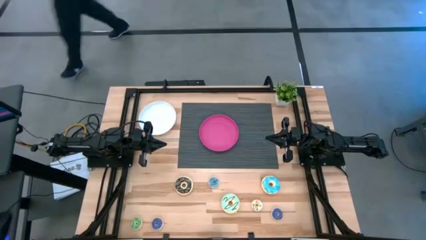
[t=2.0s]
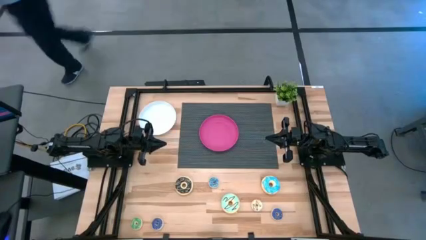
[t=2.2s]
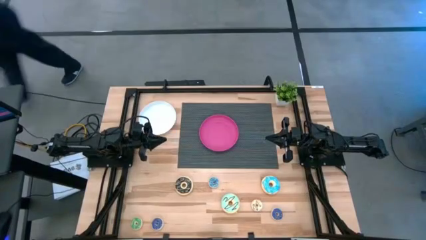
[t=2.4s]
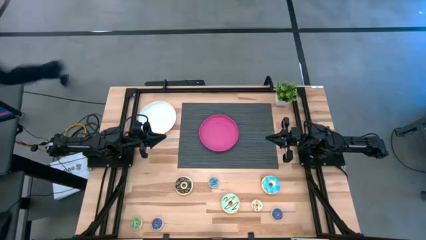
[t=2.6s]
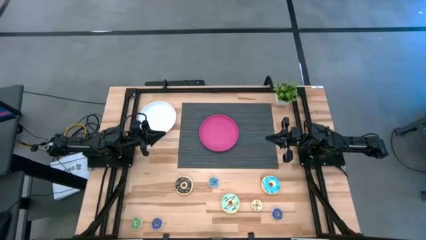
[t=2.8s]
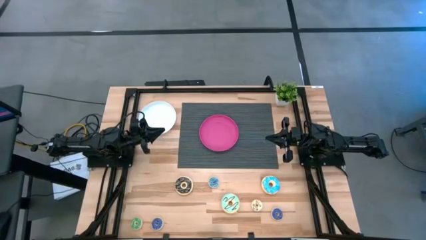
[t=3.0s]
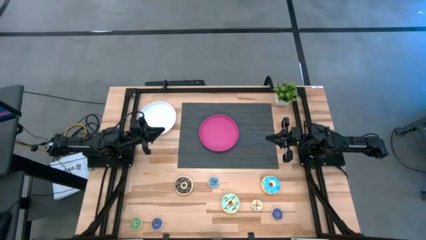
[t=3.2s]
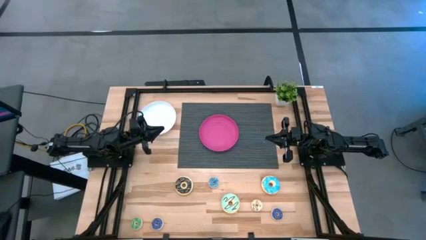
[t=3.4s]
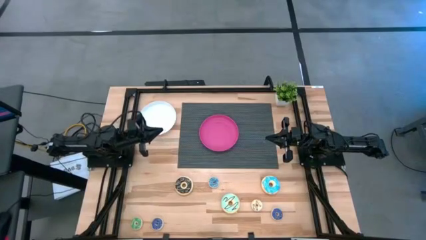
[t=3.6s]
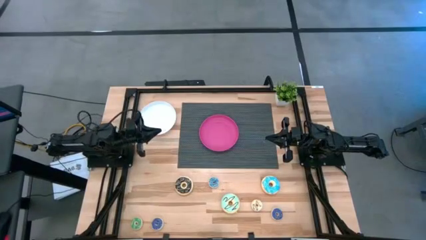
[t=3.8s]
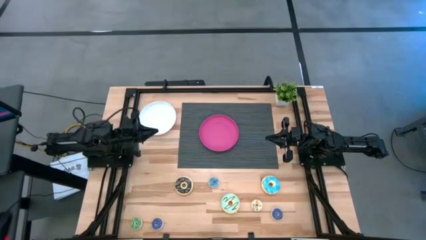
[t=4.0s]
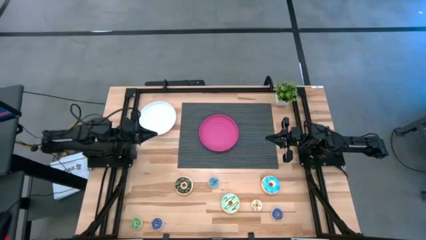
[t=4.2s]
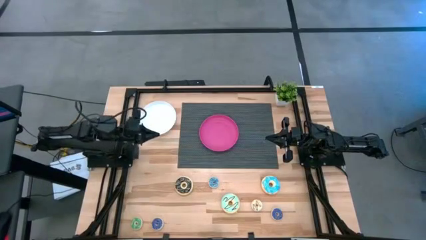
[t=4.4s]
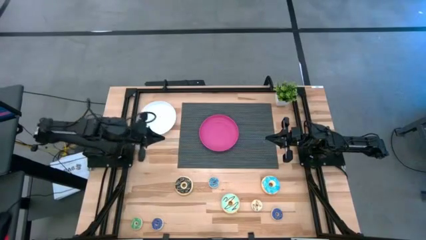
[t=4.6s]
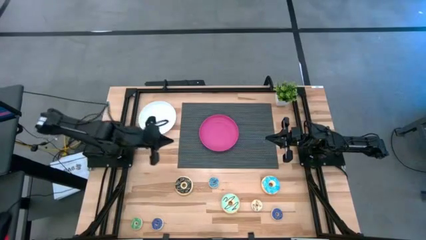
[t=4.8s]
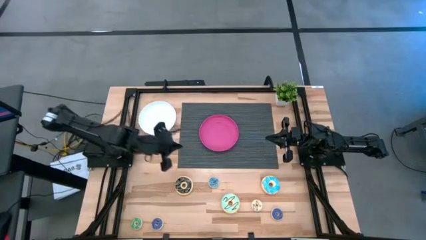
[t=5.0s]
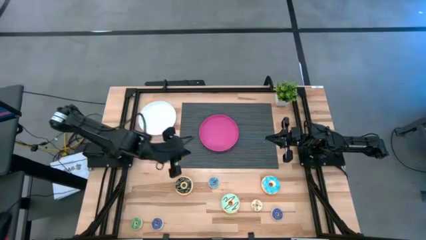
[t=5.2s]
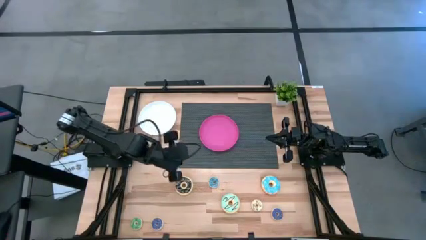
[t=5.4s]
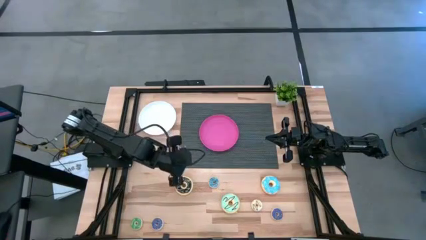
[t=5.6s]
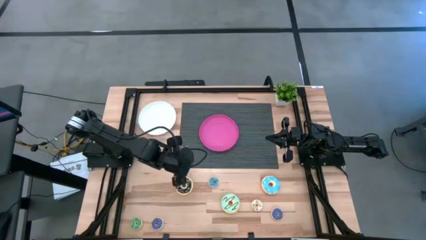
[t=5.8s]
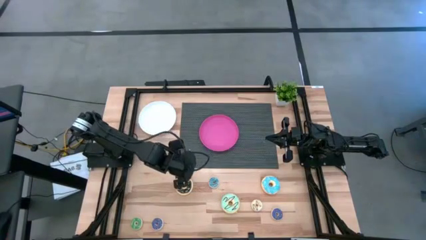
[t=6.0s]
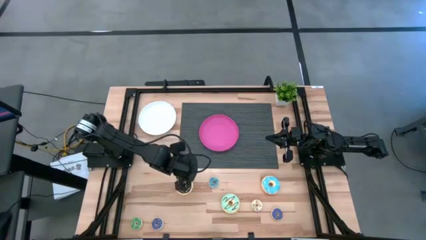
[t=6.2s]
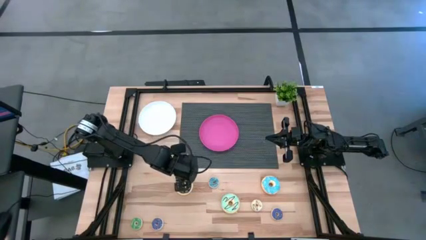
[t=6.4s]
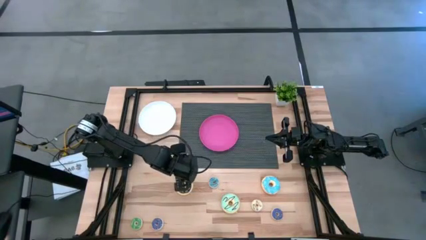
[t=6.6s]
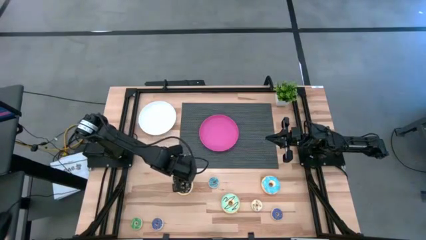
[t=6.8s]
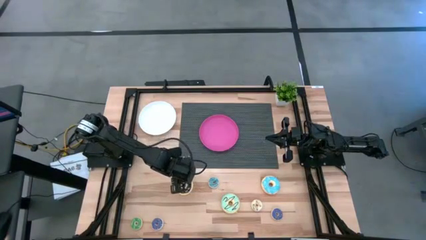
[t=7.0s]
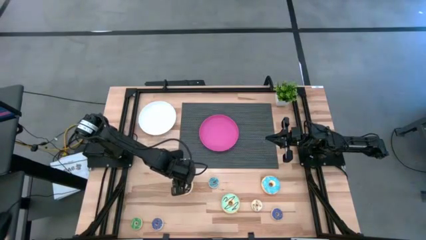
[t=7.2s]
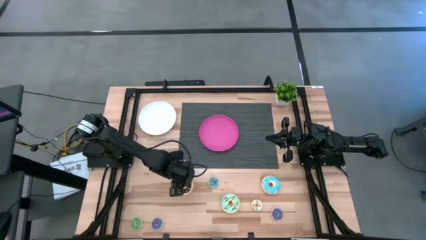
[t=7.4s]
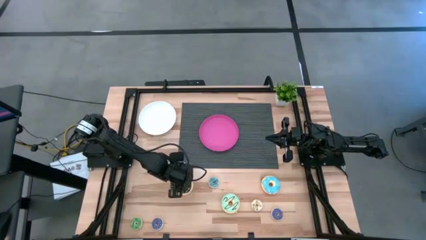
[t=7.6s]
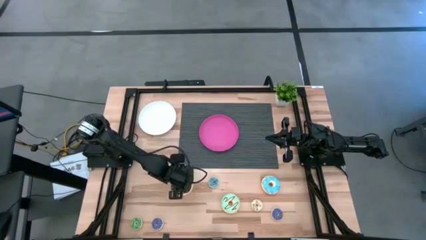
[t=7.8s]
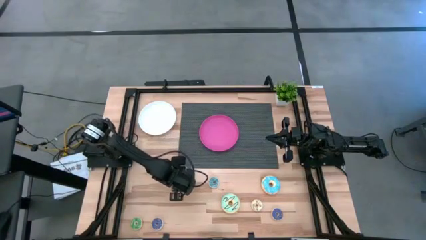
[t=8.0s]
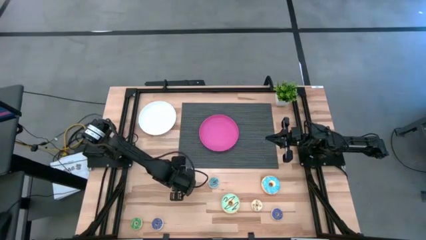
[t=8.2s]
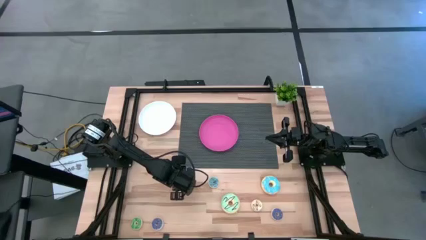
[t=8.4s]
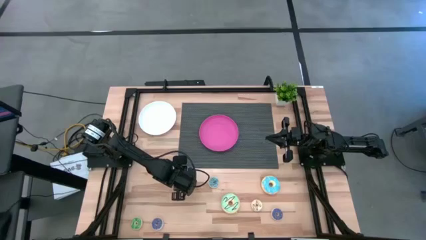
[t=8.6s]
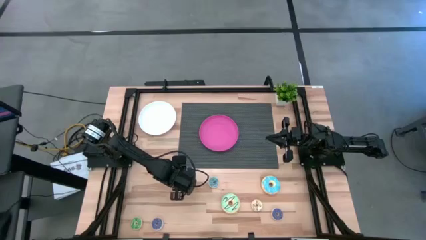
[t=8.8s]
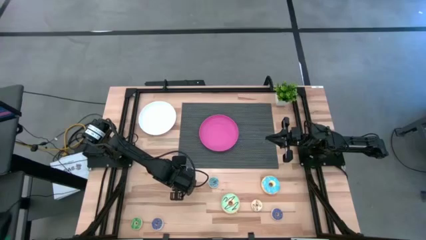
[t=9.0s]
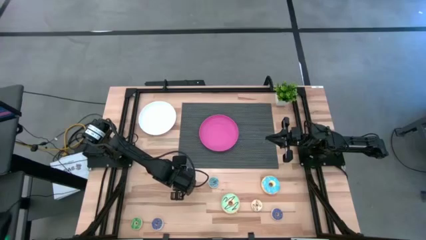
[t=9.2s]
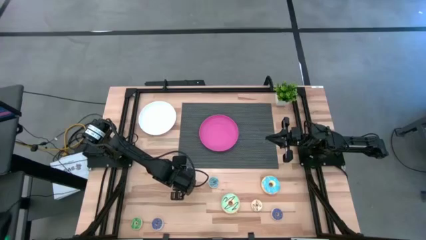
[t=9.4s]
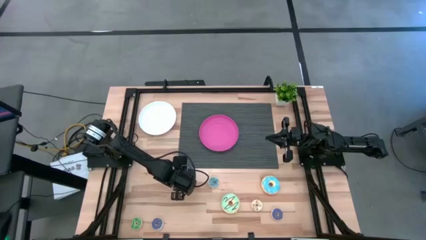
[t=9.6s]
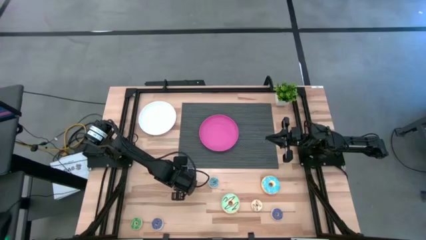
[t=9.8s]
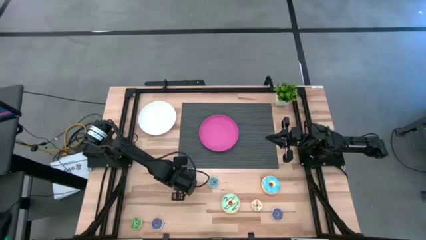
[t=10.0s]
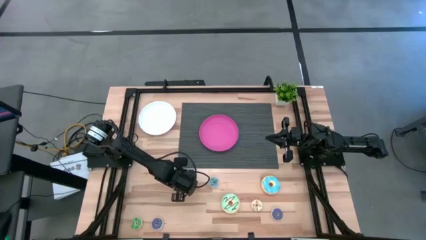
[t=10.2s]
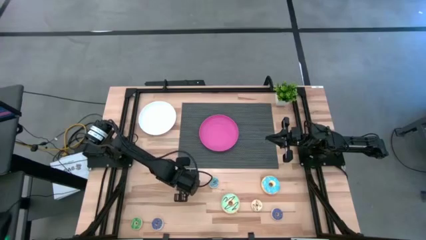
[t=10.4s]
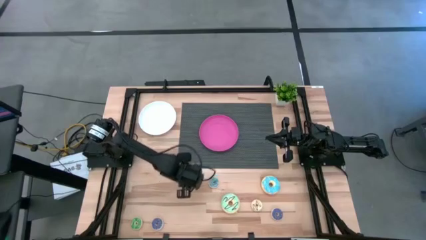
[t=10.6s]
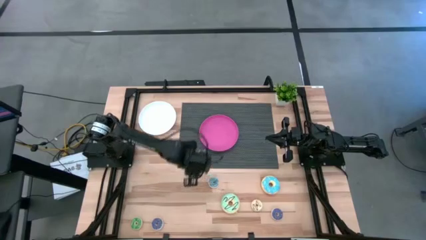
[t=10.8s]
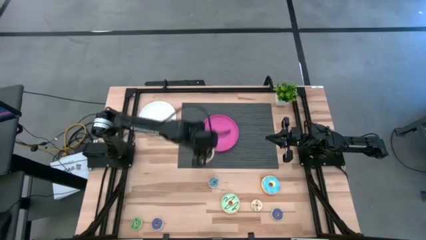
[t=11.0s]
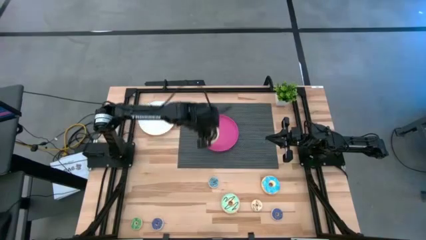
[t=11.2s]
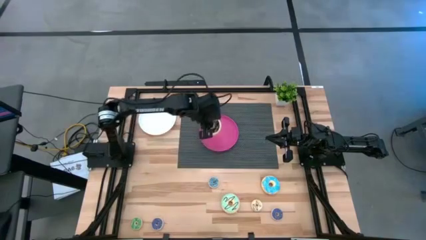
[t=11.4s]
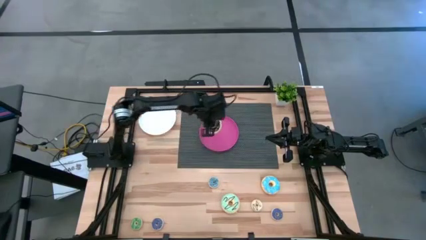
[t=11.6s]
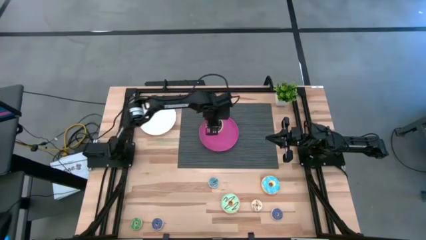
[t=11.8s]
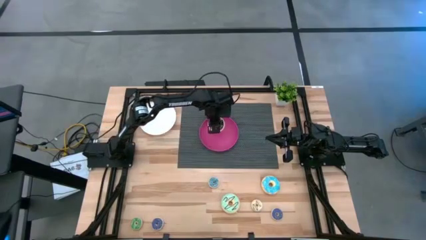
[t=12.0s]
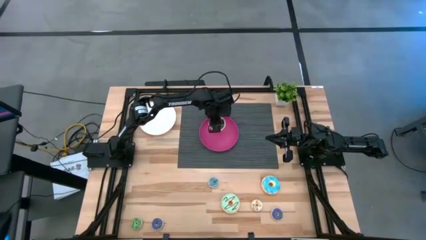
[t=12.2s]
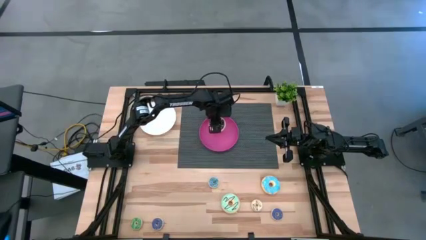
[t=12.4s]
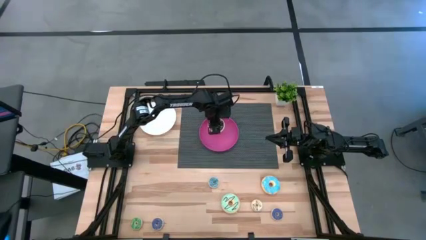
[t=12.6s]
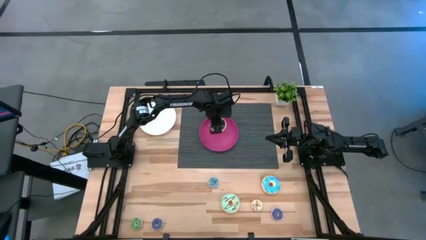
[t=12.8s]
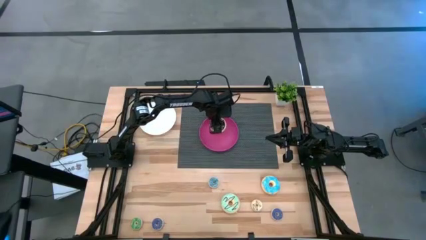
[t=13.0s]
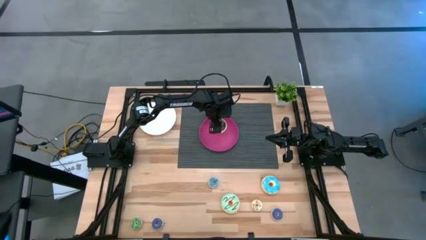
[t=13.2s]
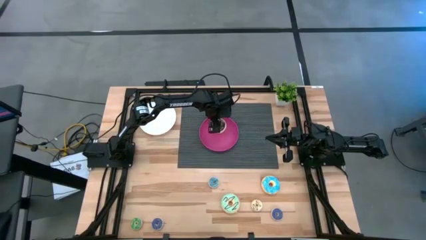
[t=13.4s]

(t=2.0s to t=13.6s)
Task: Pick & Place donuts
Put the big black donut on the pink plate

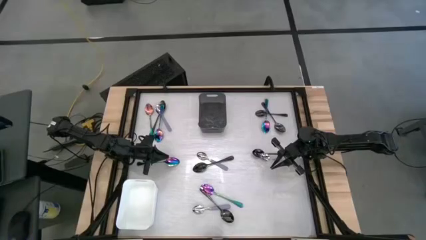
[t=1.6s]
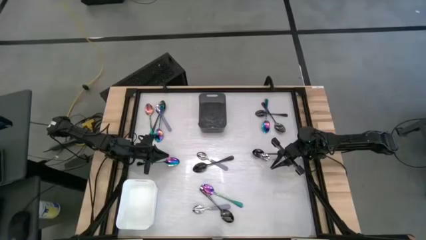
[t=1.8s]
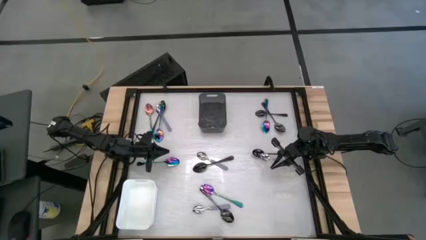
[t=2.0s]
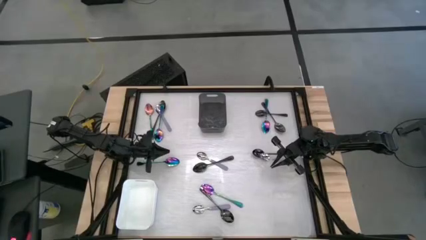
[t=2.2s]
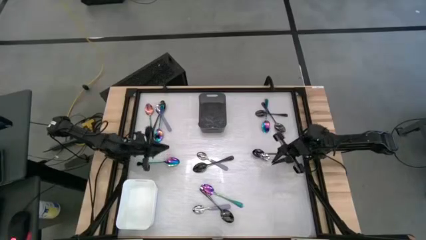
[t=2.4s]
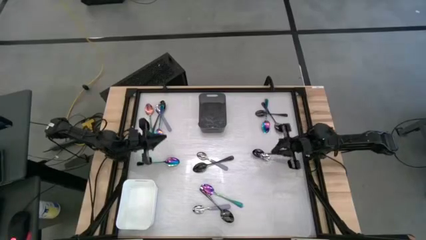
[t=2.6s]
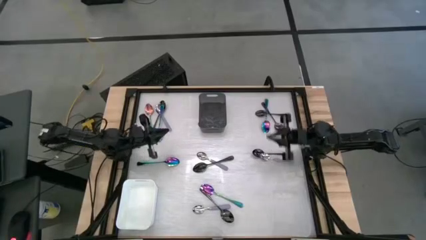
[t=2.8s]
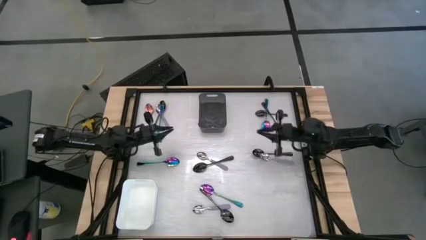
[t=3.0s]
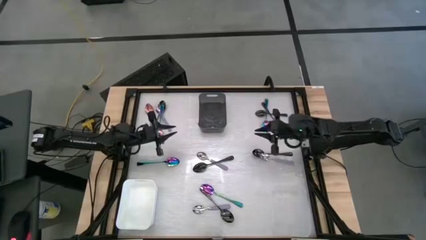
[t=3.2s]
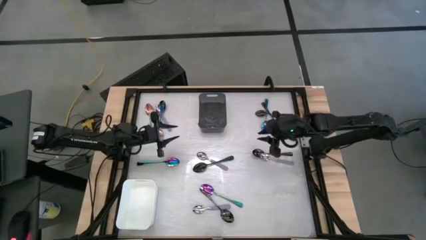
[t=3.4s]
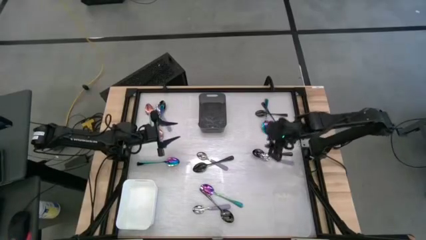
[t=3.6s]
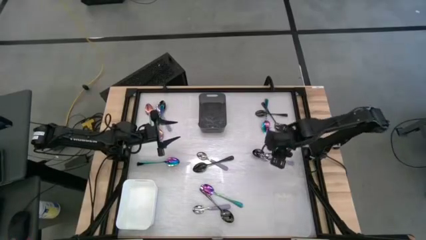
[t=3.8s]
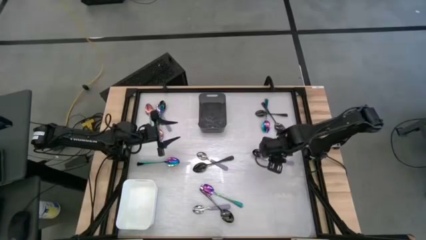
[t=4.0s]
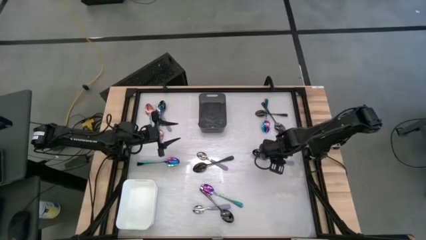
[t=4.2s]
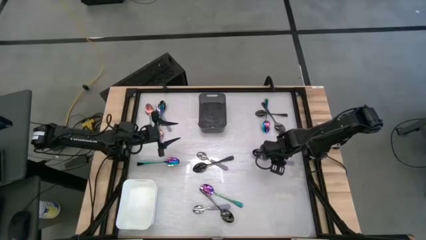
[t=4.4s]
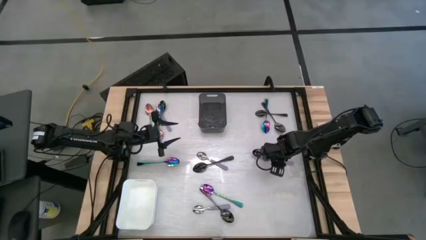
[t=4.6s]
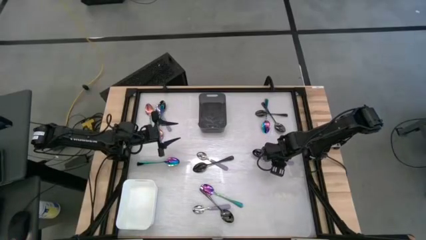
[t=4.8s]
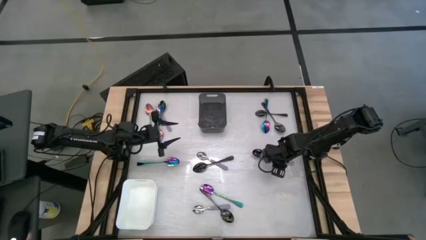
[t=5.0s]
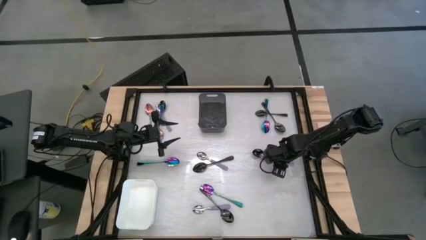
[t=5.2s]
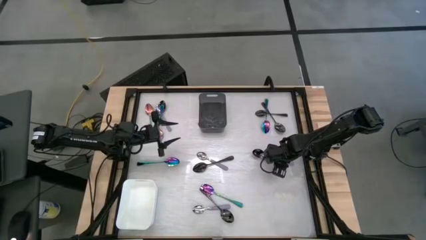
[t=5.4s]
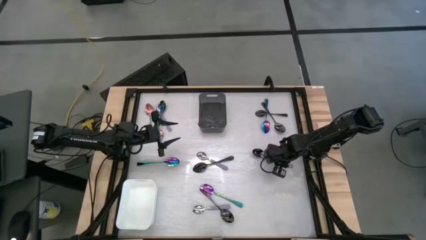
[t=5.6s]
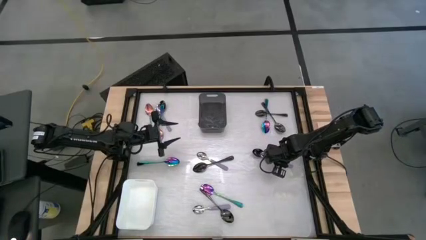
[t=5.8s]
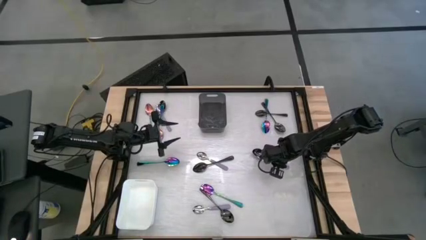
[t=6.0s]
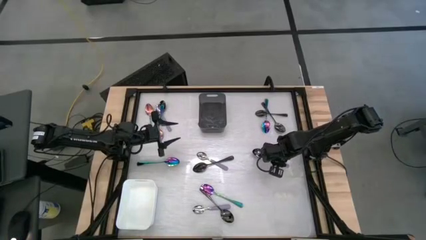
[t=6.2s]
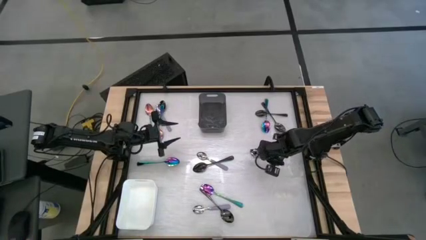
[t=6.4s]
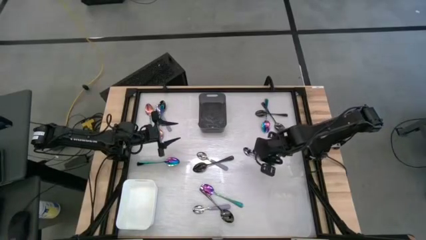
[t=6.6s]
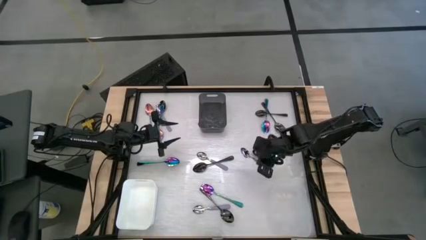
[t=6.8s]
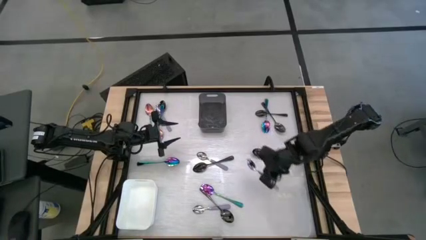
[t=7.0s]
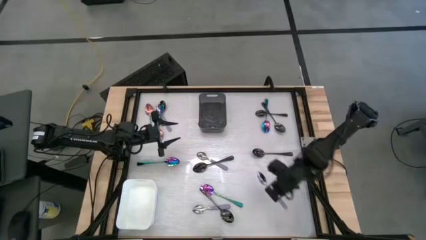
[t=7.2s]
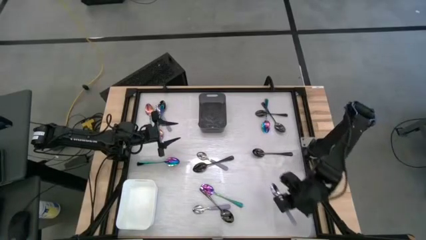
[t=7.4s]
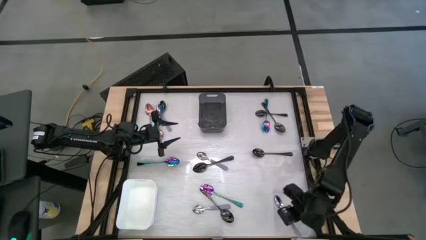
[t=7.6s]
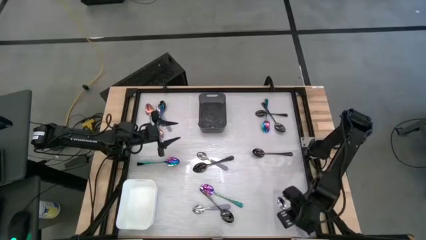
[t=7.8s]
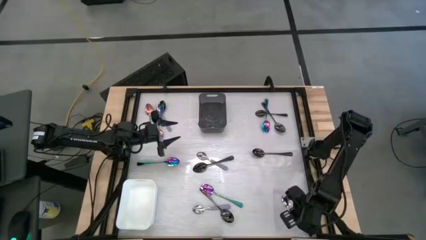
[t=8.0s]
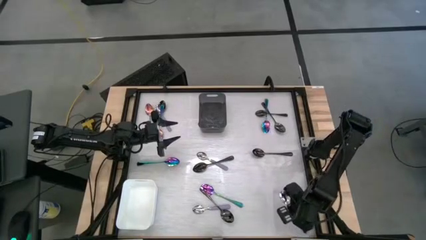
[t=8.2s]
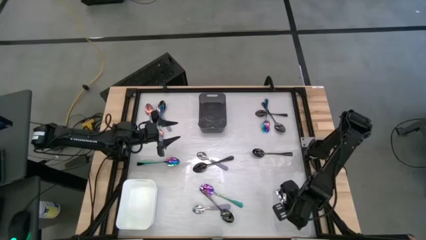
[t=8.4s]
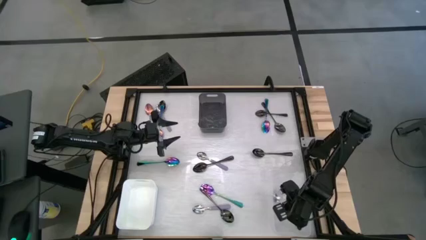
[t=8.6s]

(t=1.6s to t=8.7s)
Task: Sort silverware by color (type)
Put the purple spoon into the transparent bin
